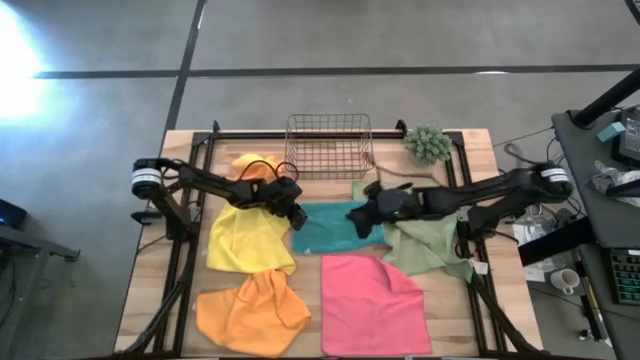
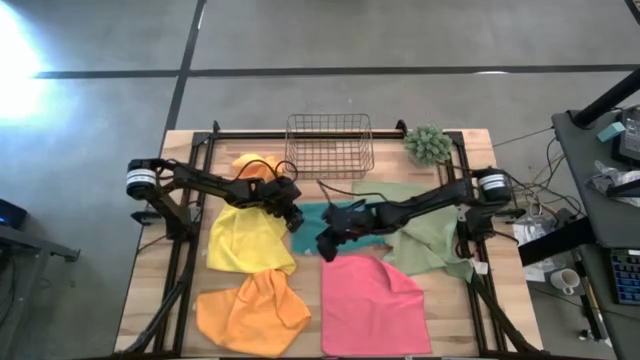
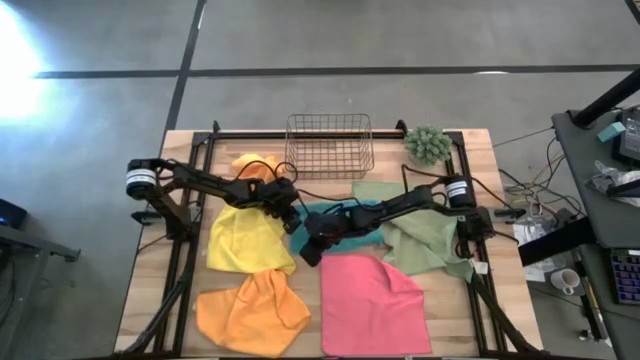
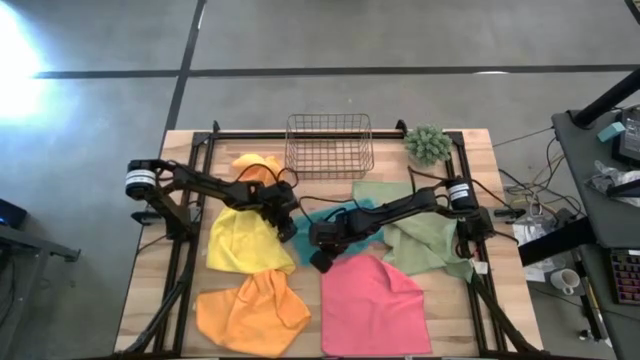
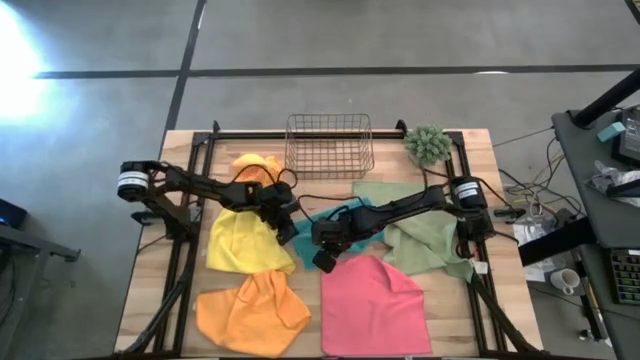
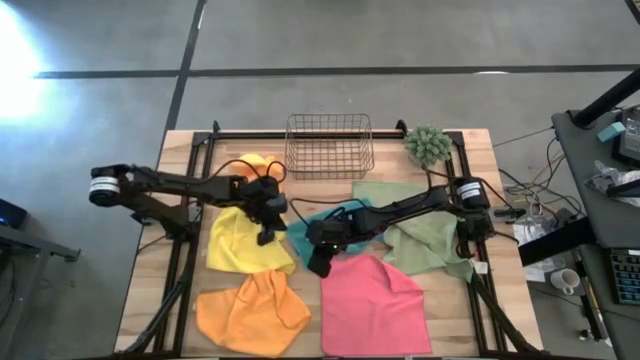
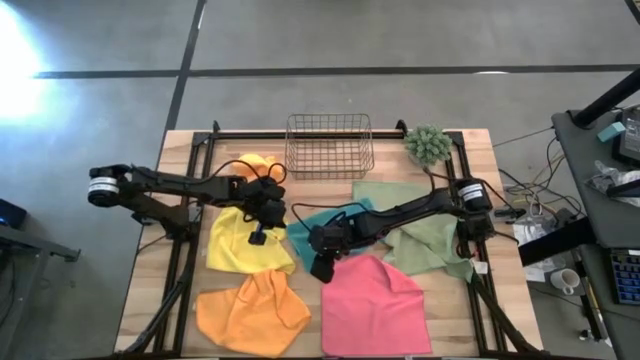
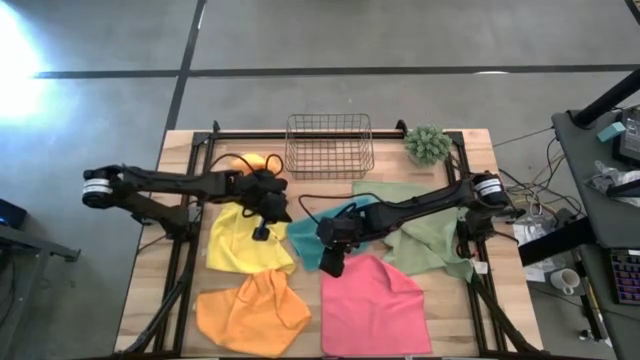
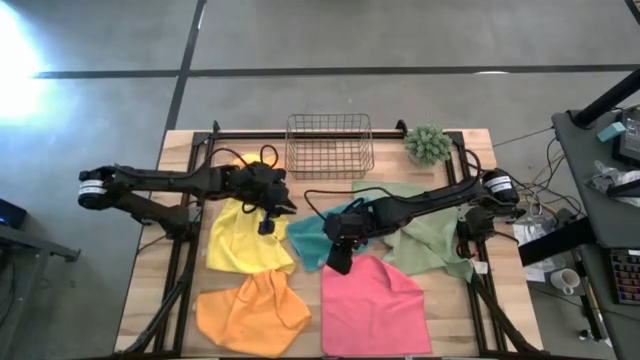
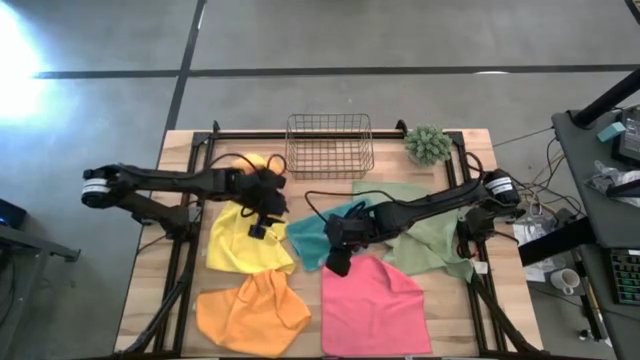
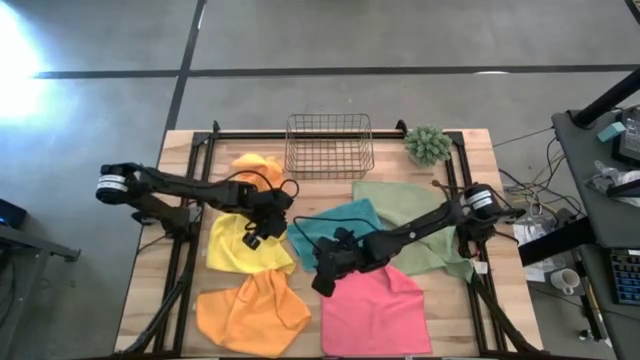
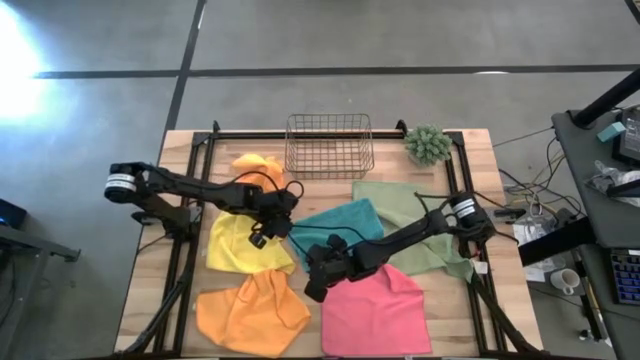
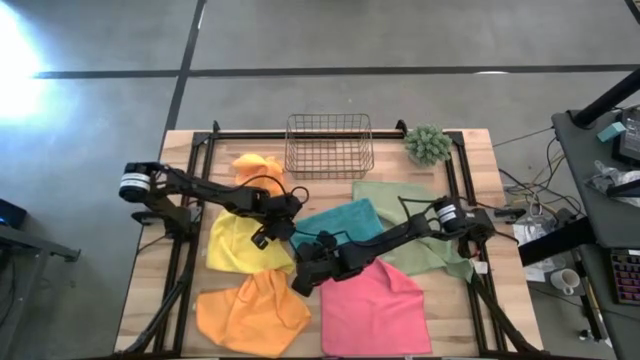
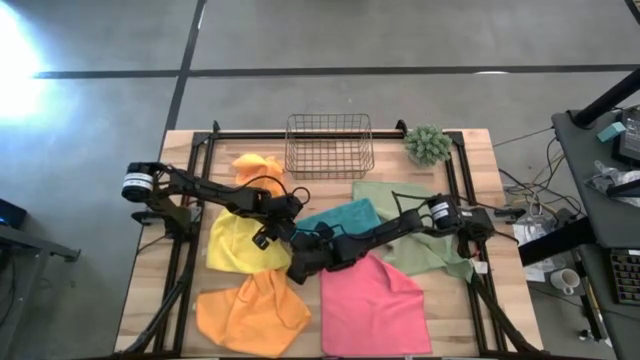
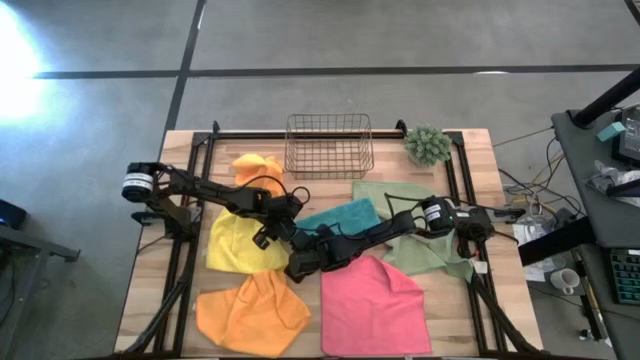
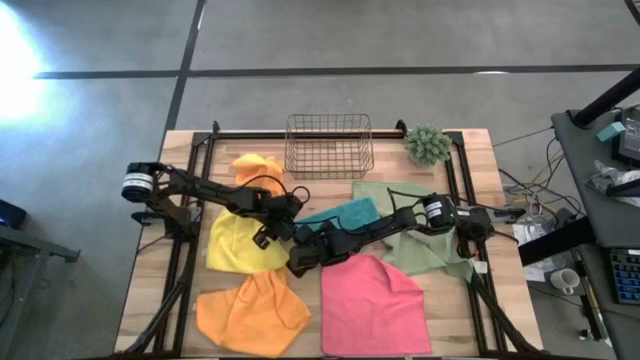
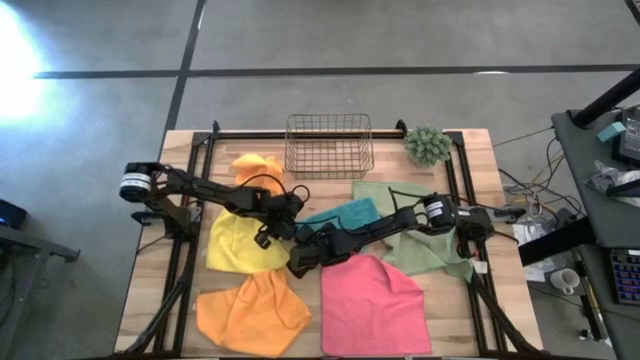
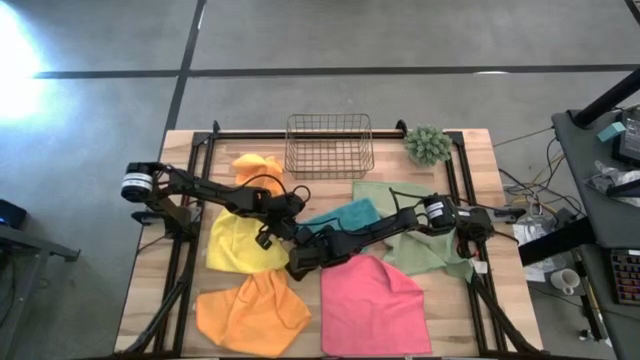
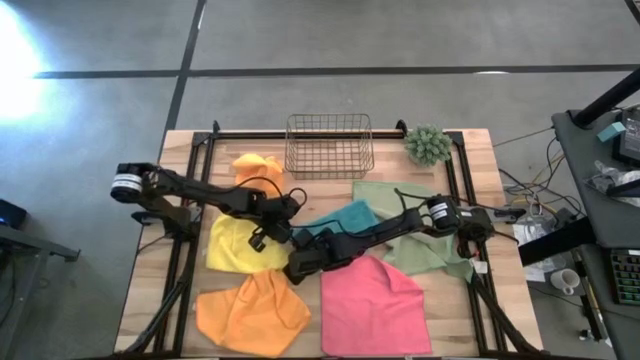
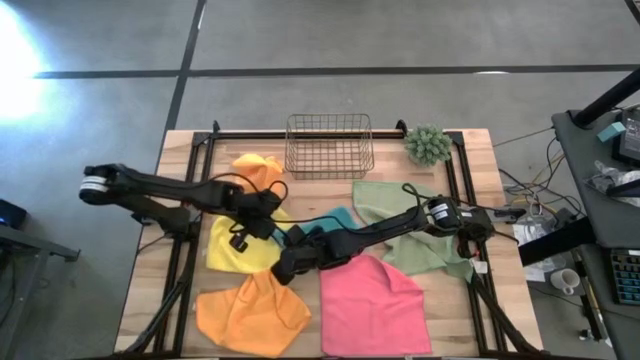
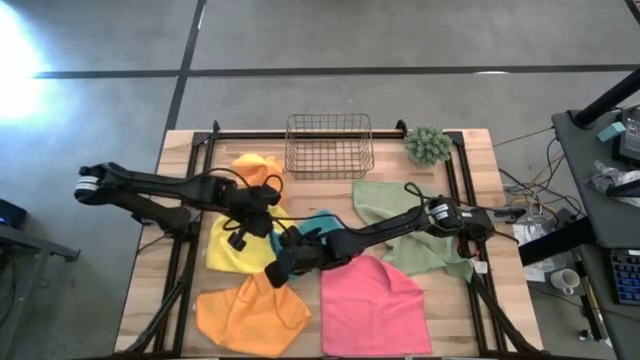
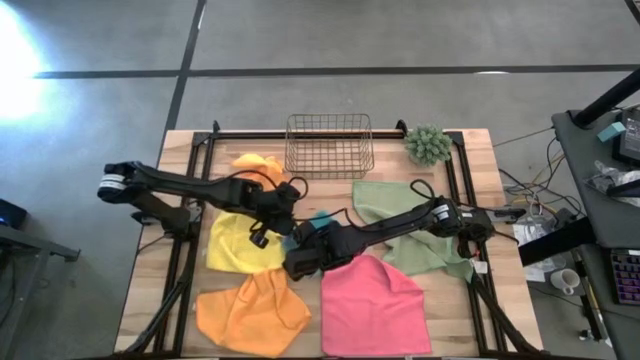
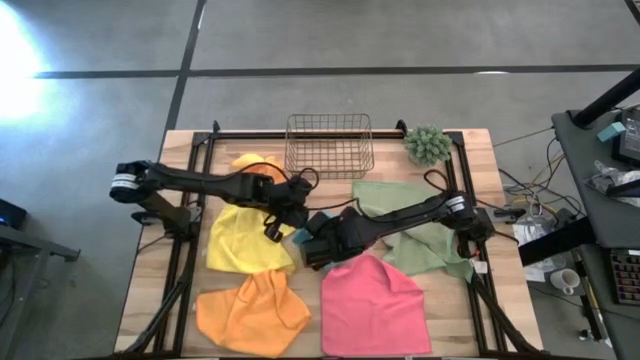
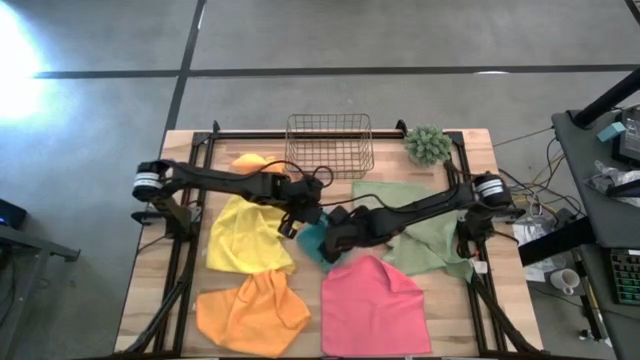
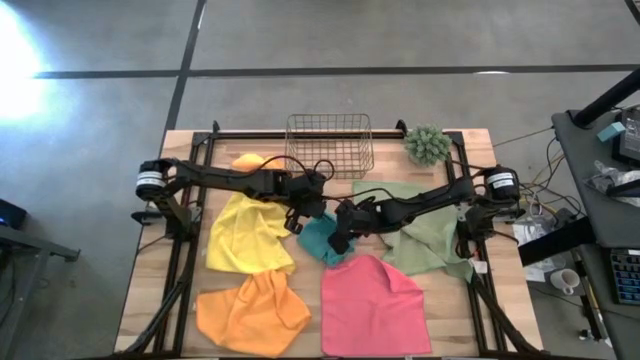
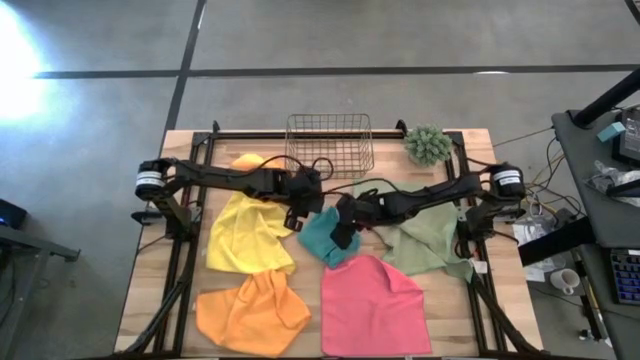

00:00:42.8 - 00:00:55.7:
Task: Fold microfiber towels
Fold the blue microfiber cloth

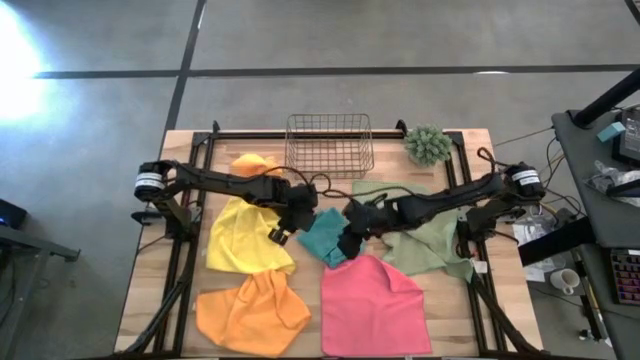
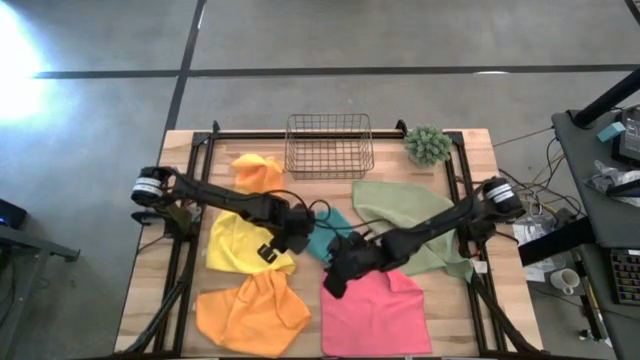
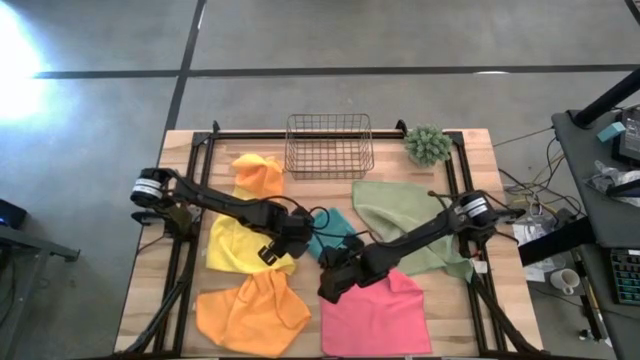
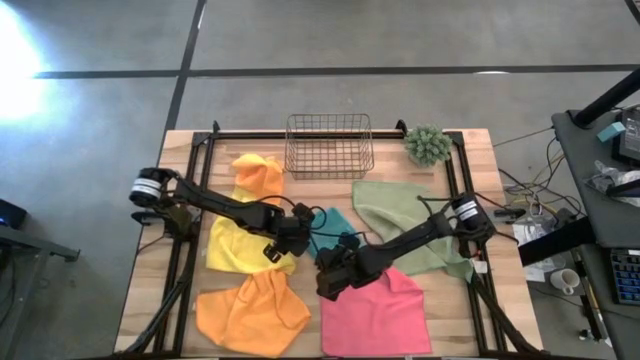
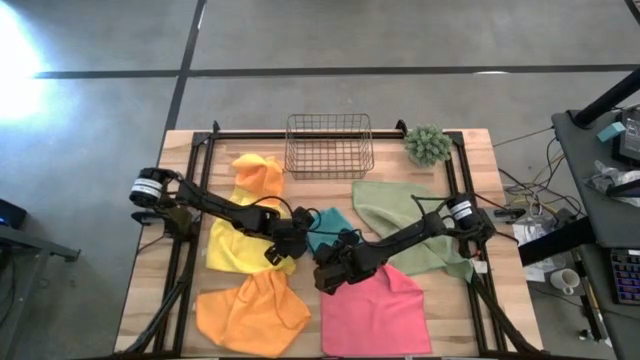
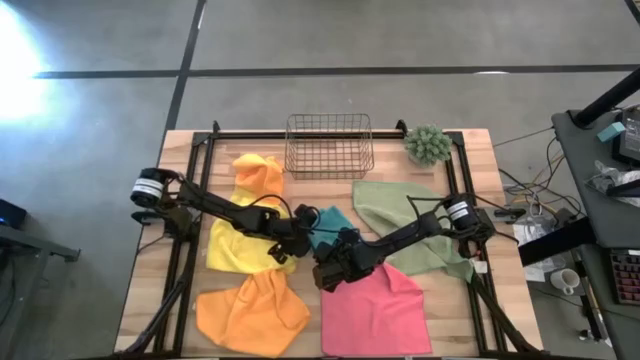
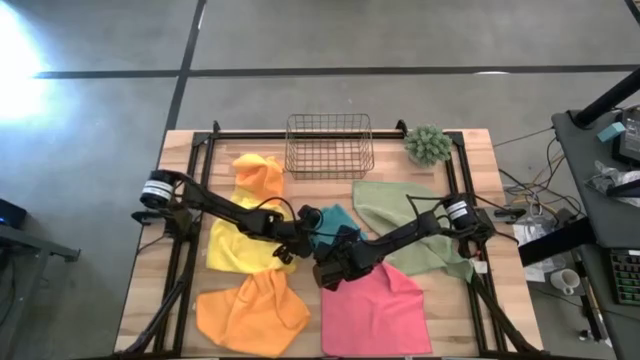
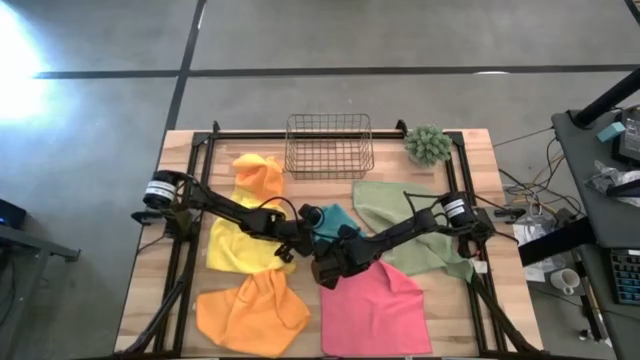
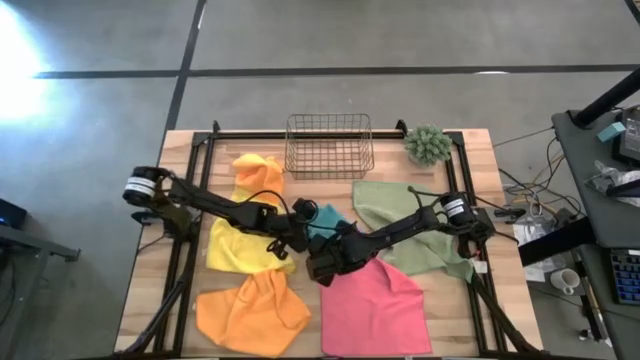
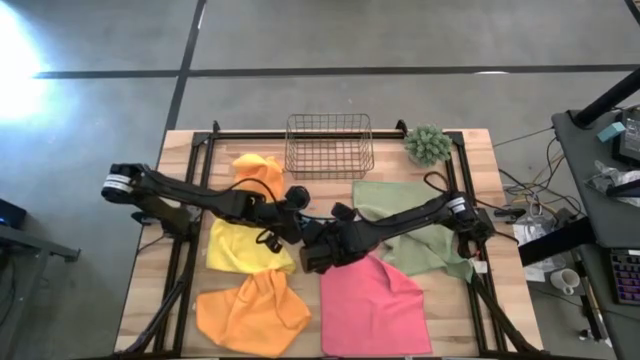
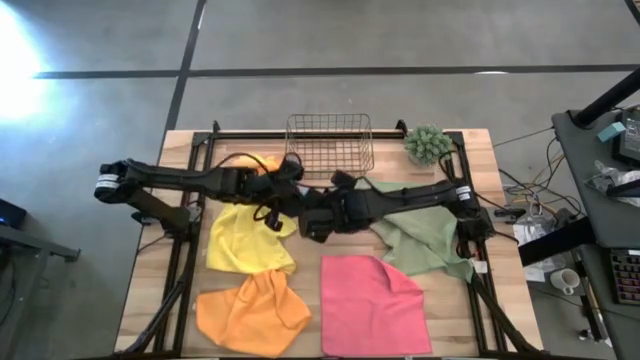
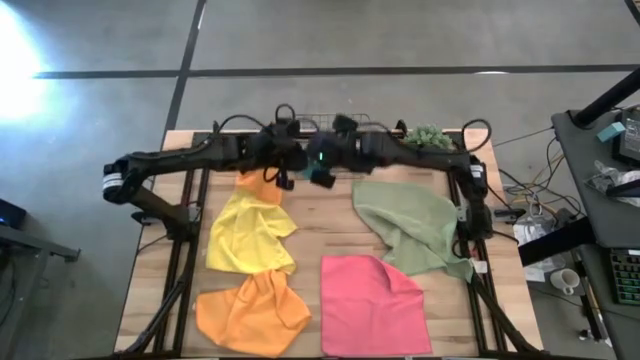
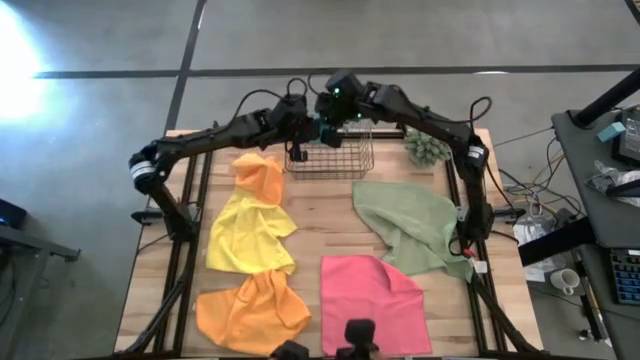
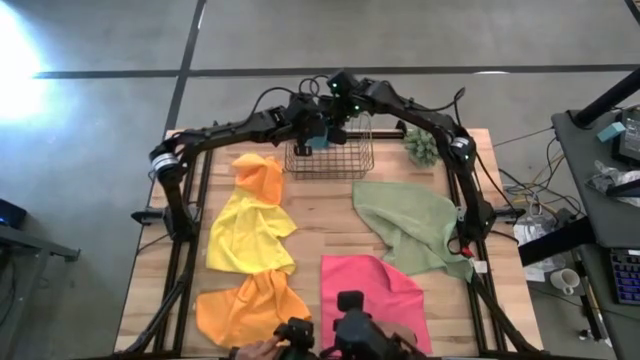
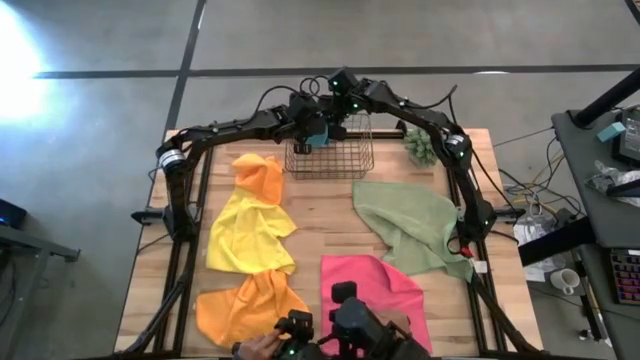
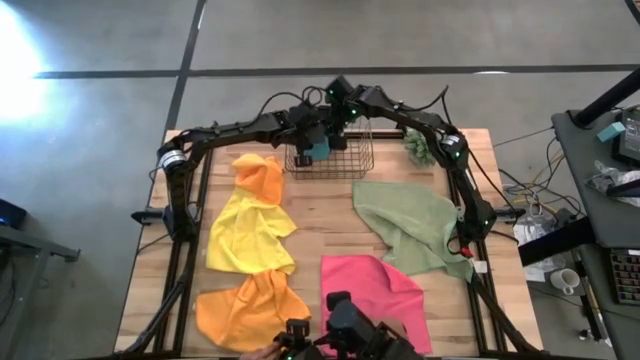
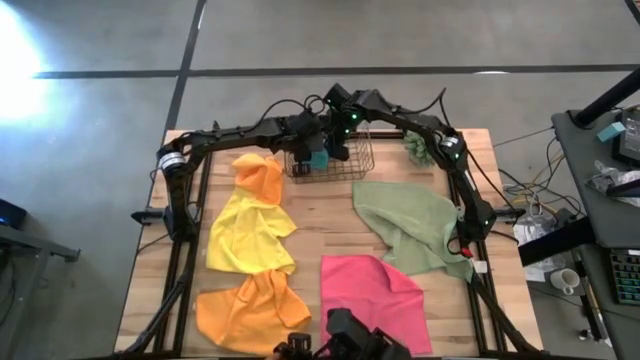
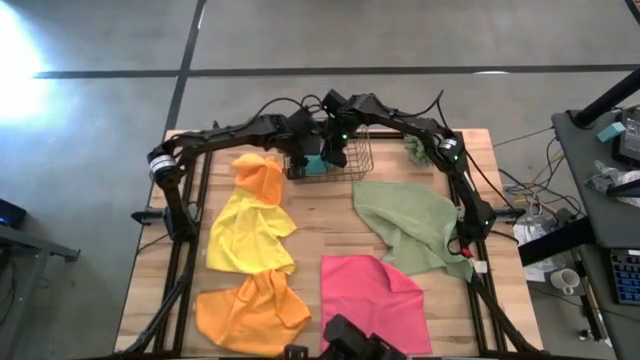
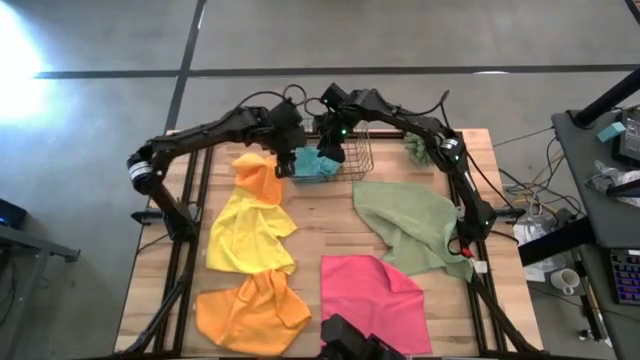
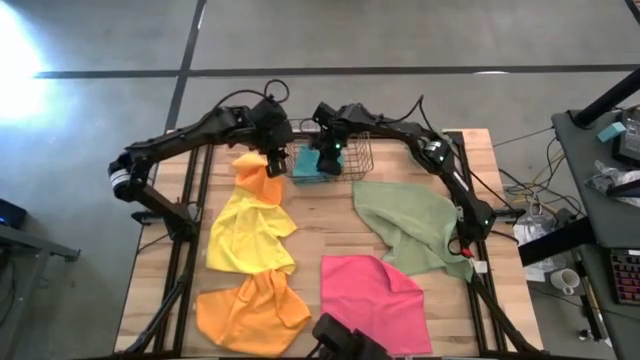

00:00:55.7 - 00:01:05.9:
Put the blue microfiber cloth into the wire basket

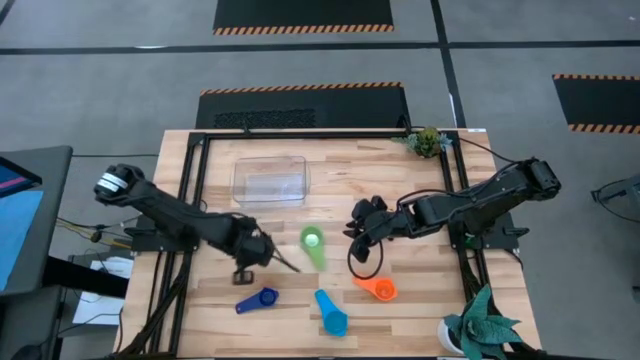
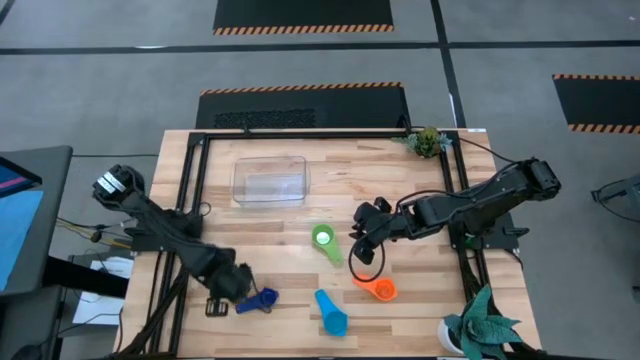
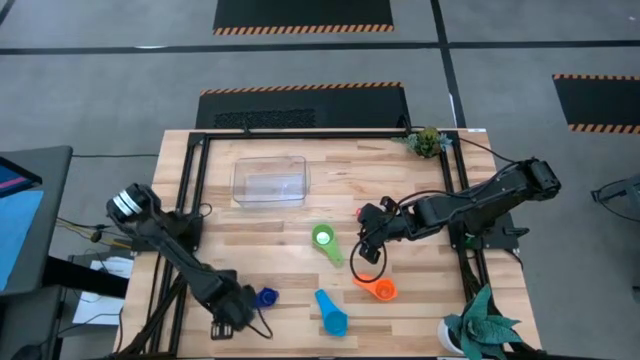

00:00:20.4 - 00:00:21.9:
Task: Nest measuring cups in basket
Move the blue measuring cup to the center of the table
